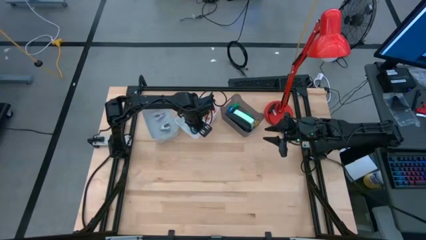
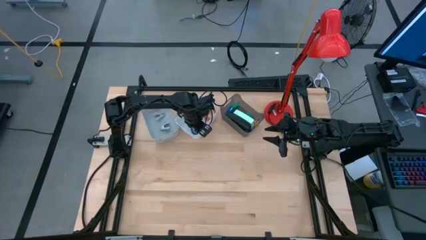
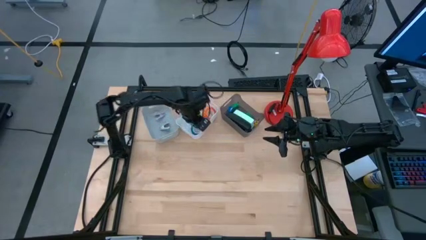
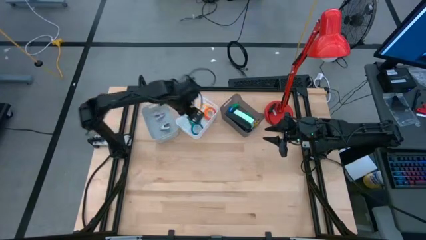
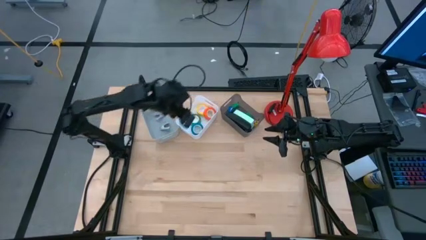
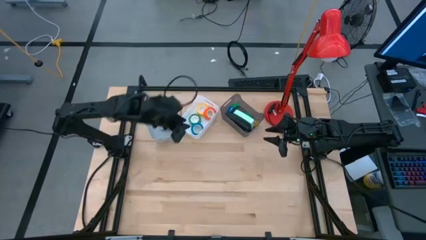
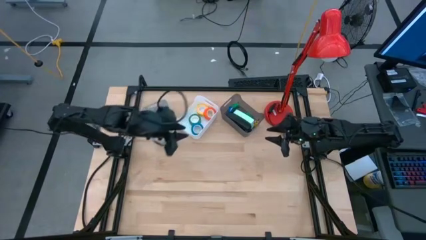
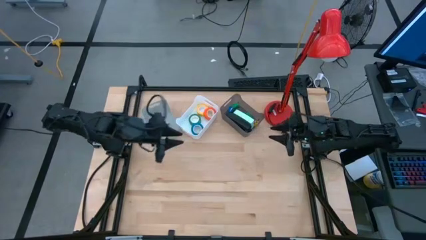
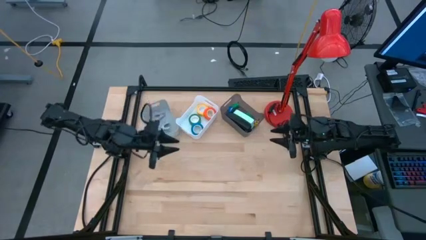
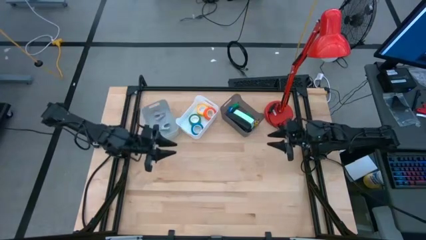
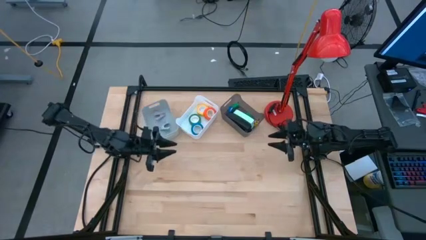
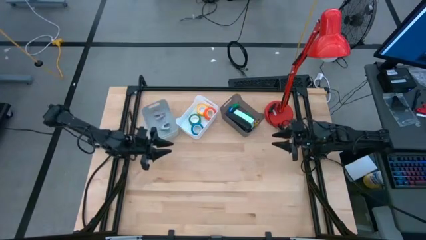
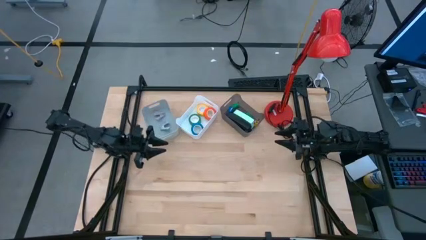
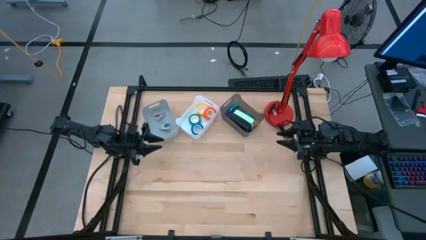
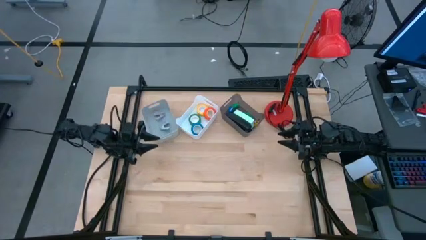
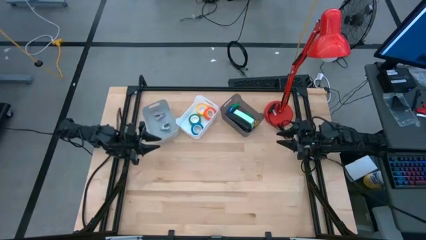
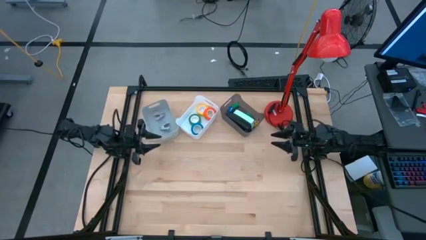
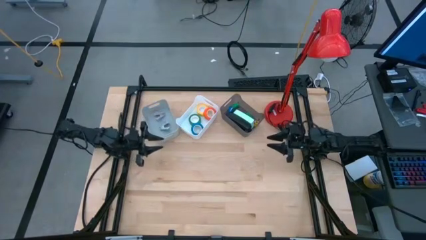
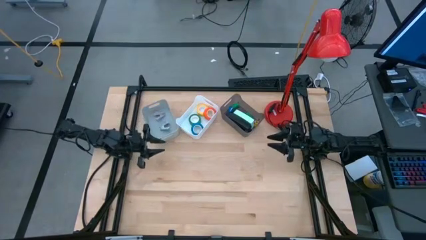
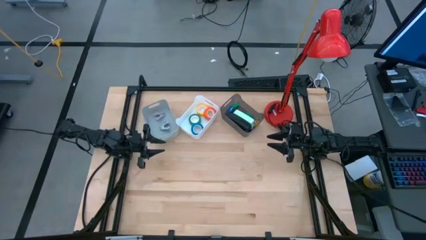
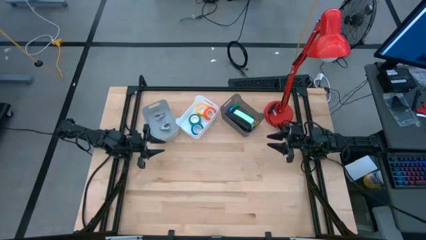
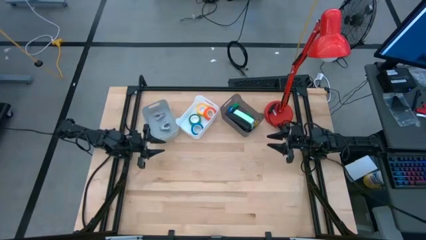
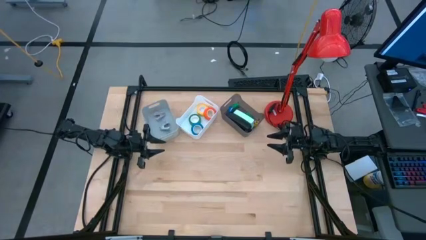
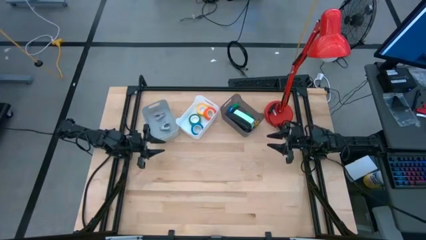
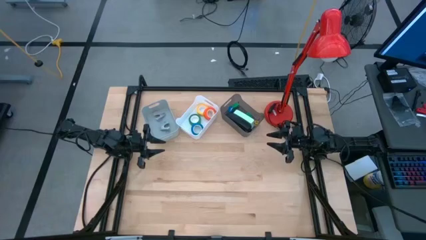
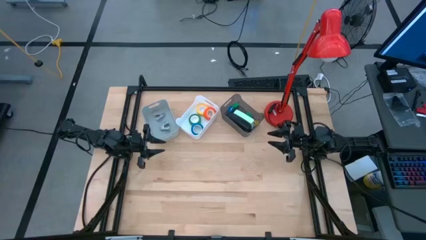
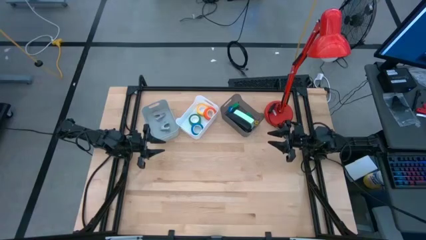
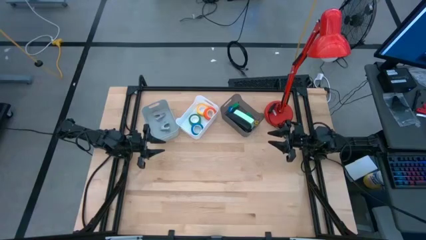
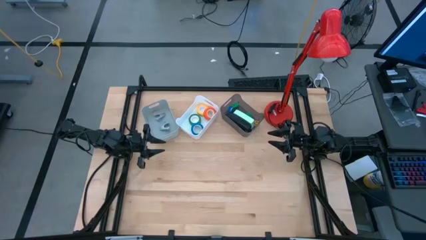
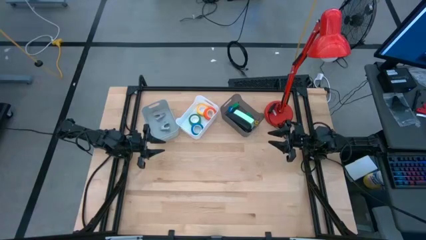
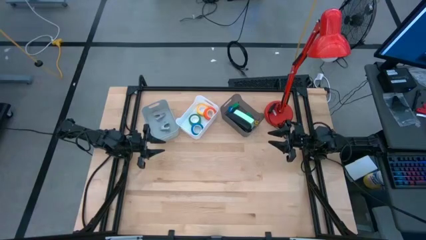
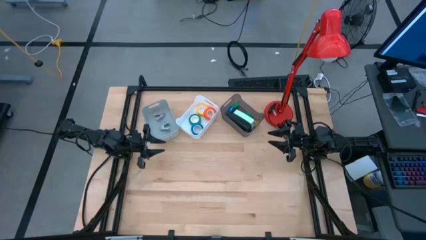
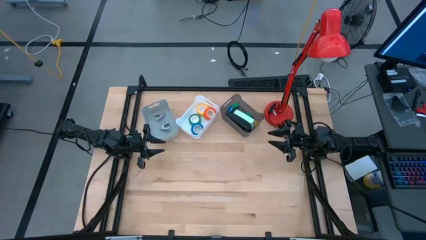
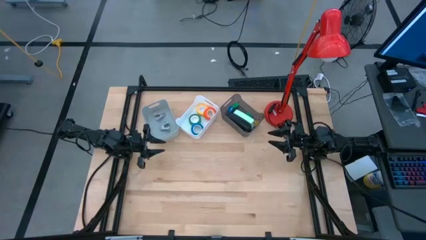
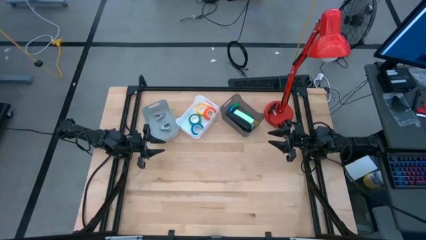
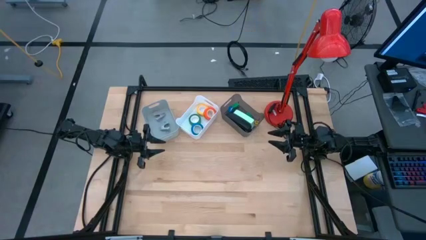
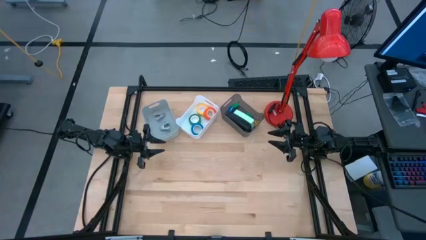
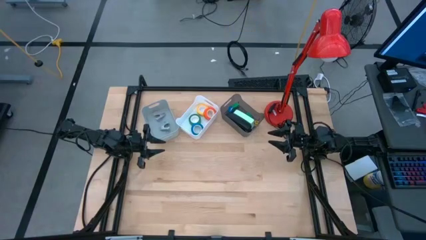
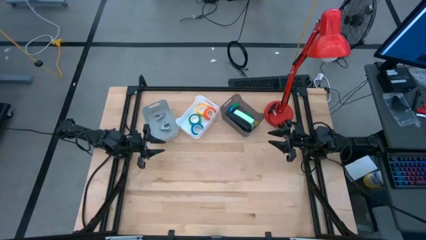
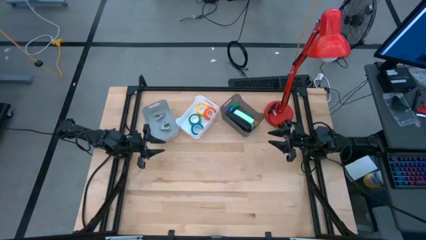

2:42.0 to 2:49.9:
Task: Pick and place Stapler, Stapler remover, tape
Return to Home Position

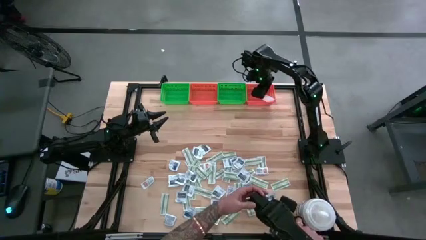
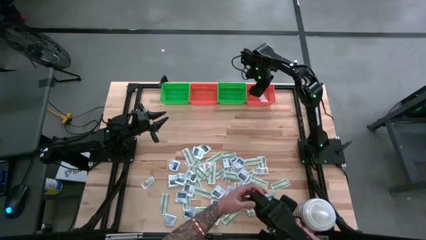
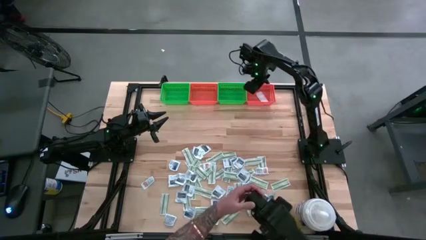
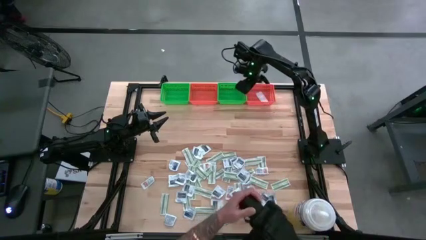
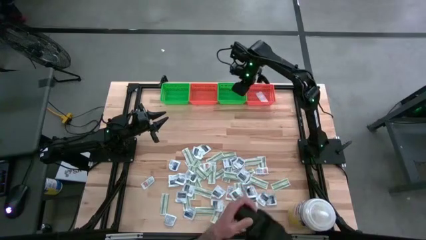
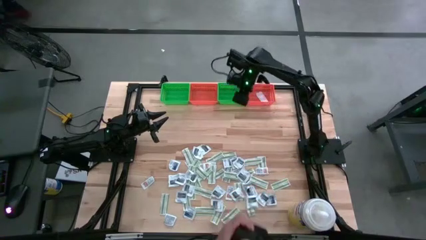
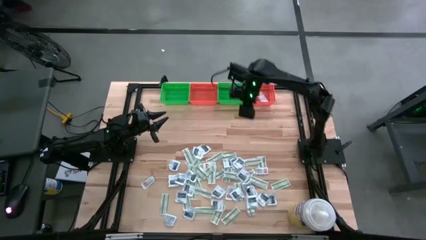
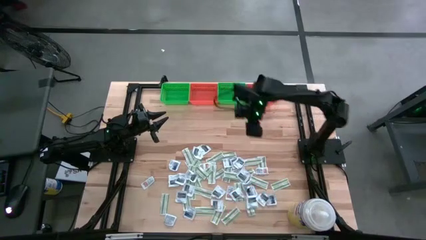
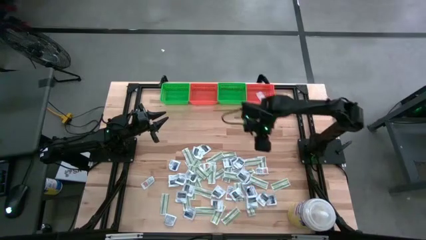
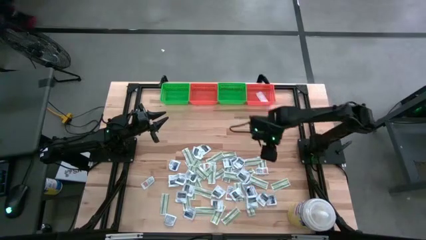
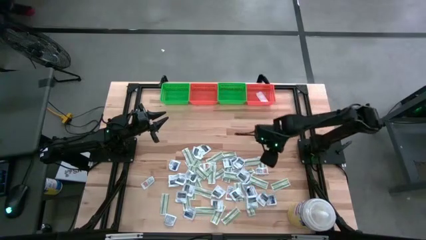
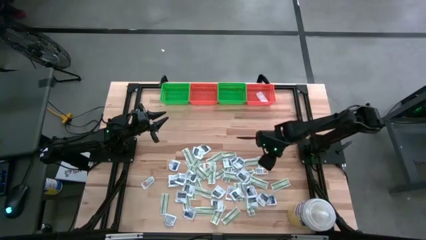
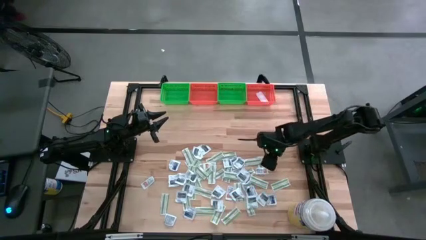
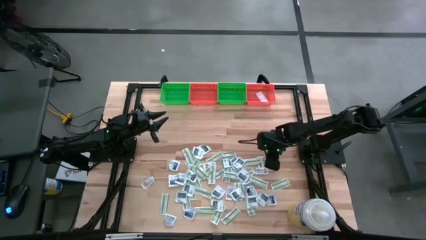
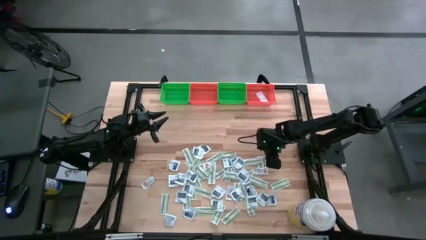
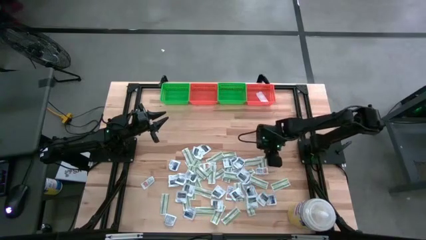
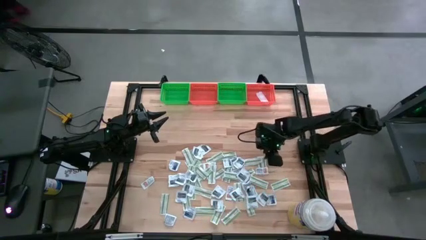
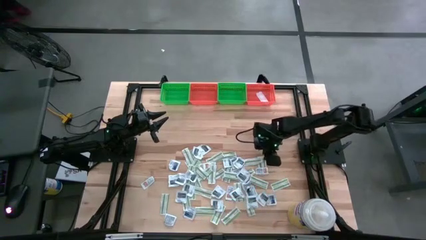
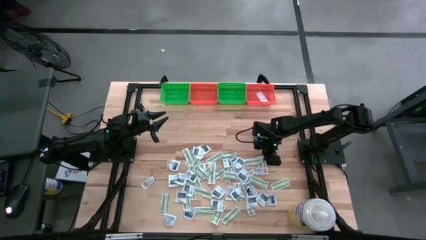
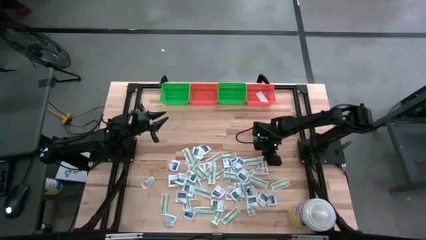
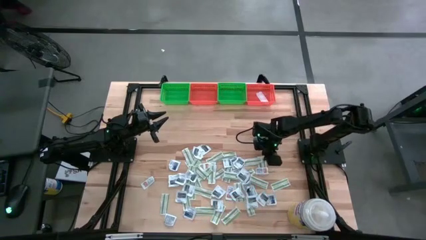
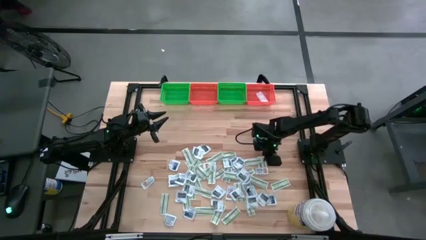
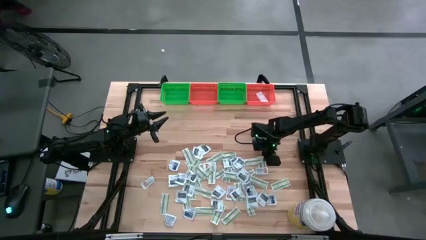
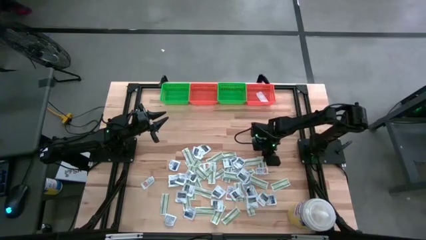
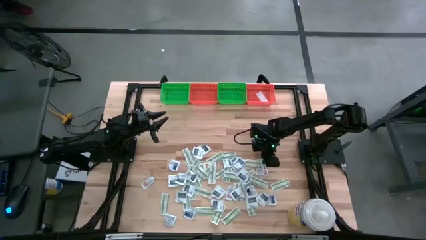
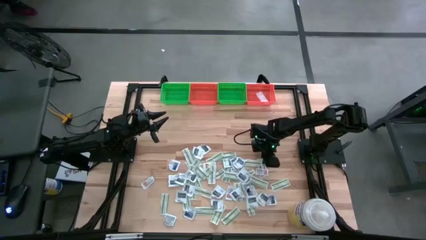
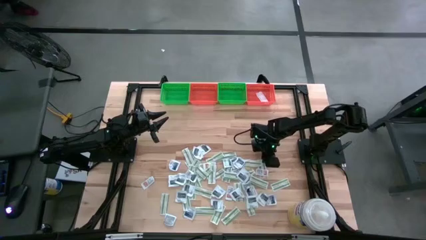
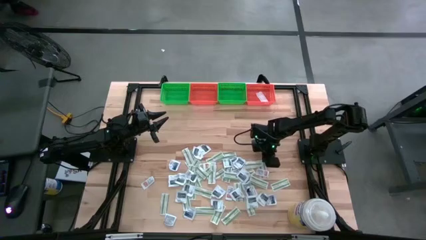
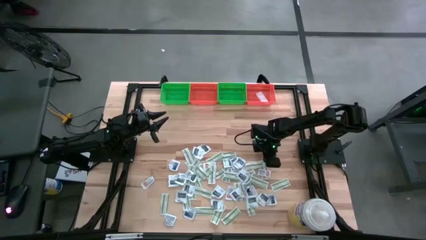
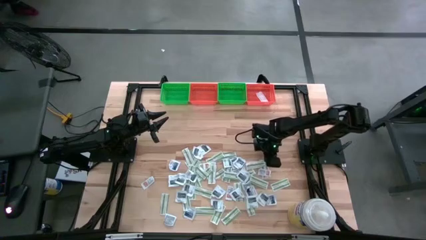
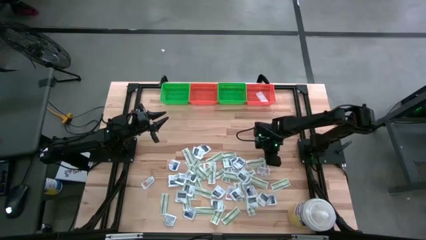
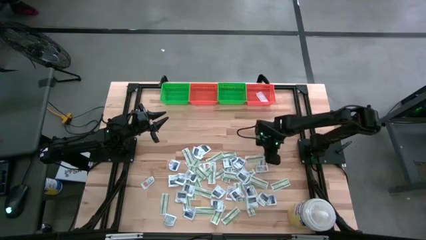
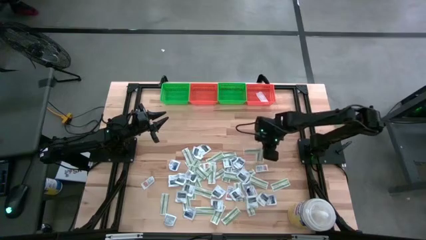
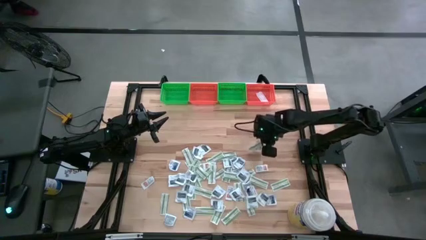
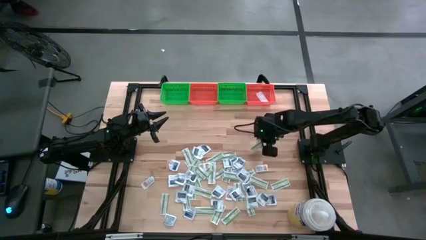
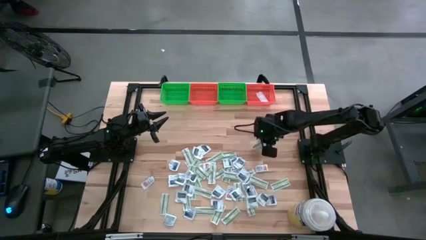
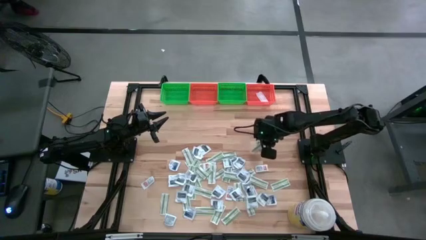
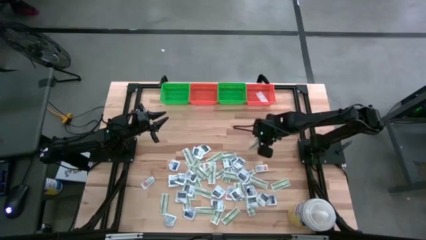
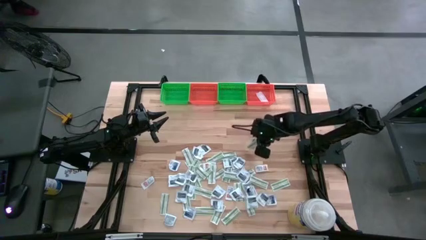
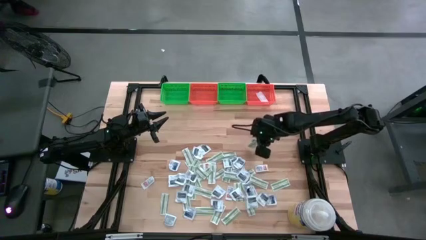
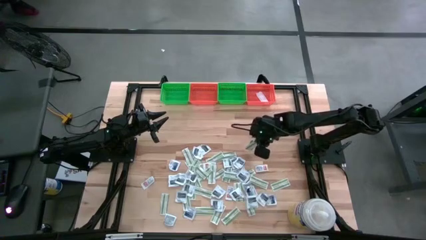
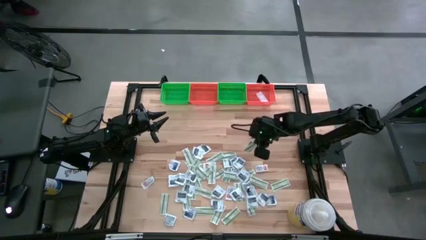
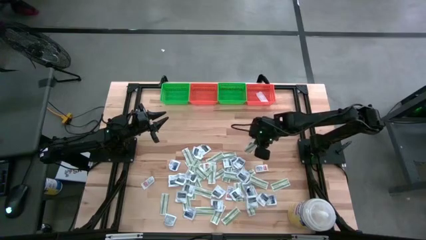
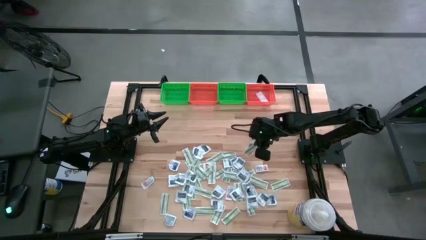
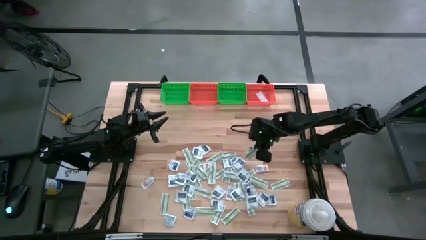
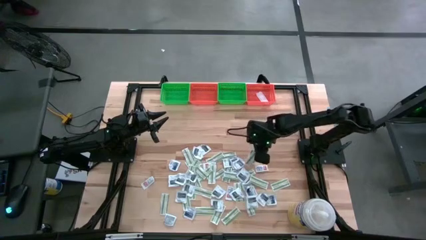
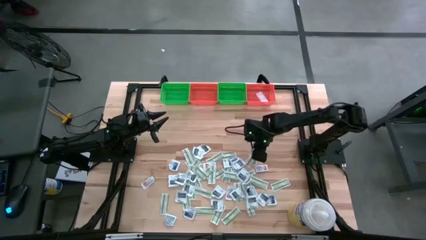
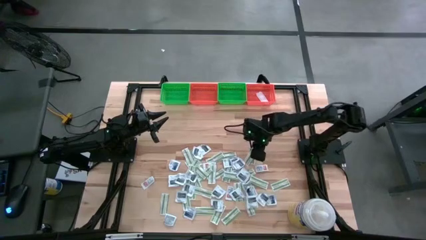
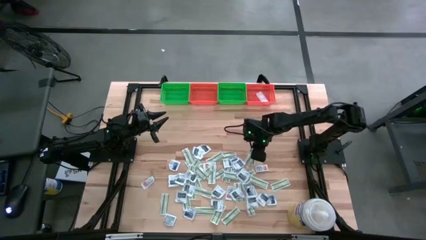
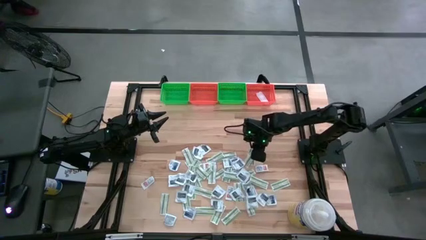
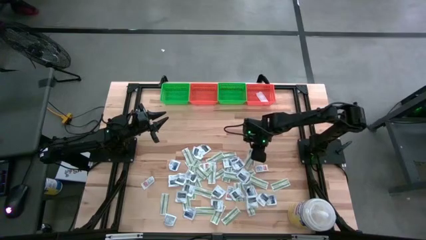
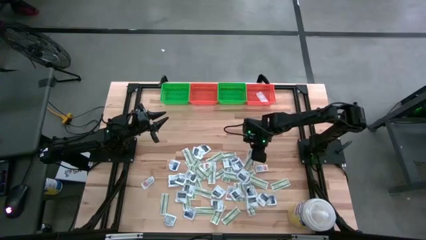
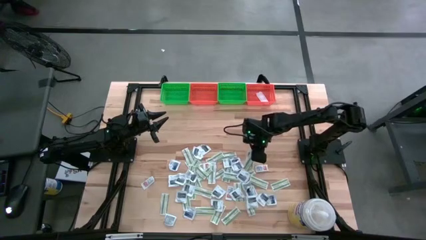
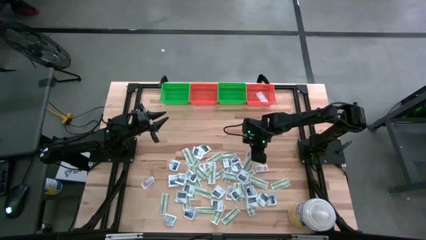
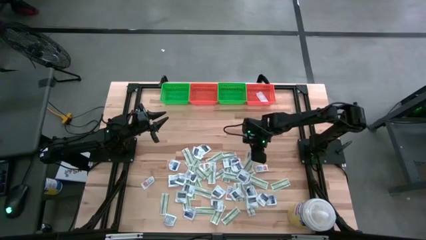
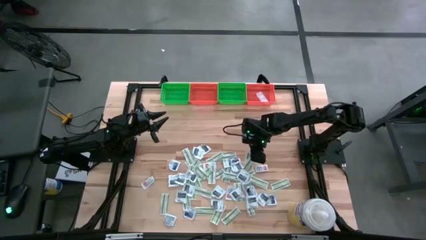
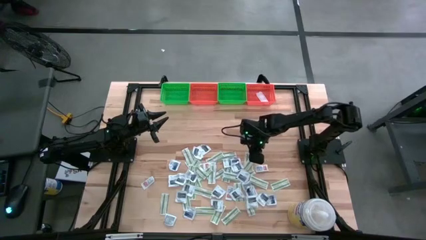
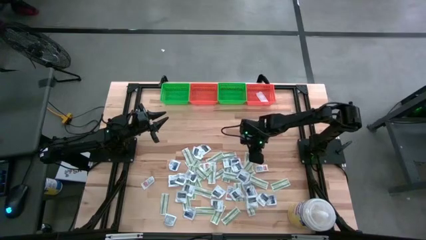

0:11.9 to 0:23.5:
Task: Pick & Place First Aid Supplies
Put the green bandage pack in the right orange bin
